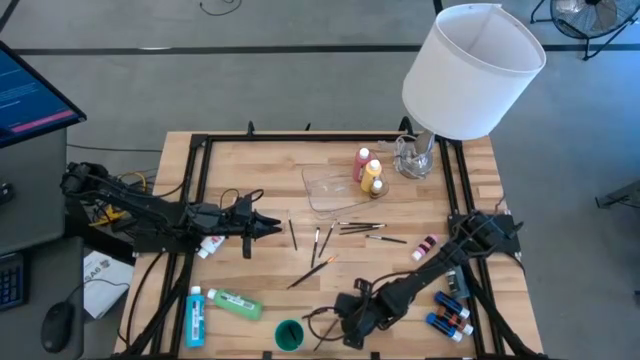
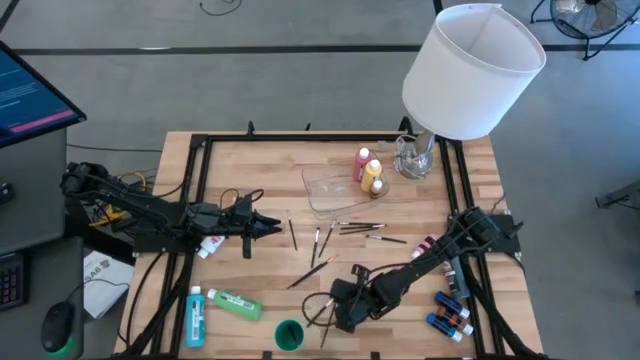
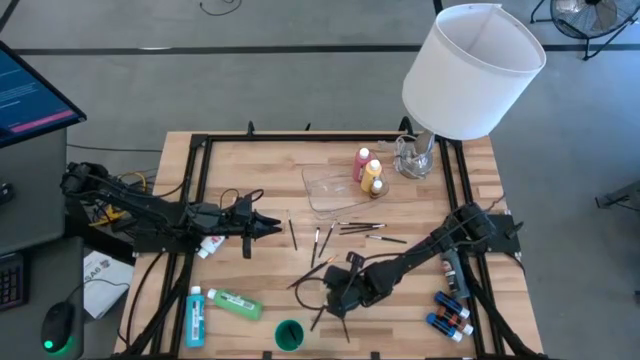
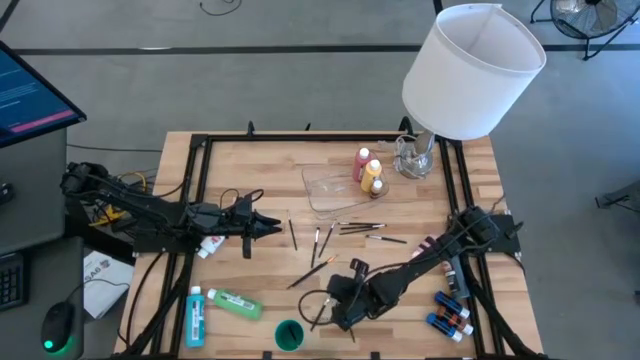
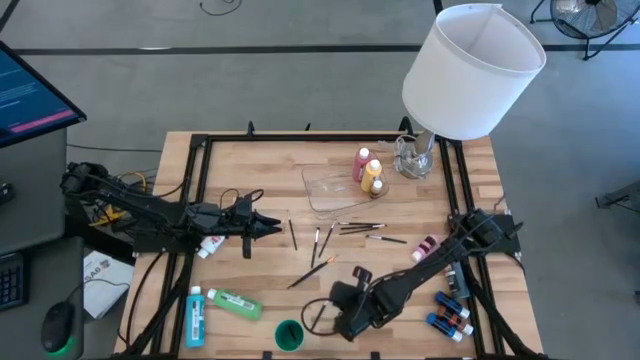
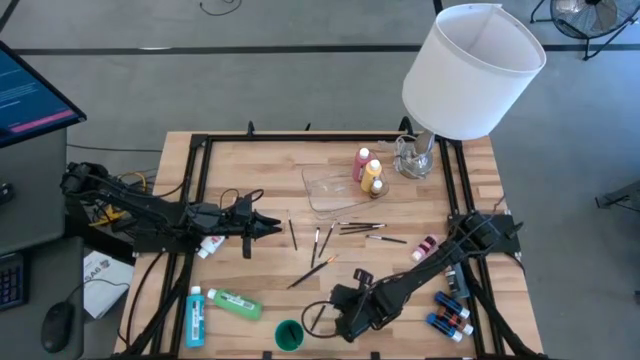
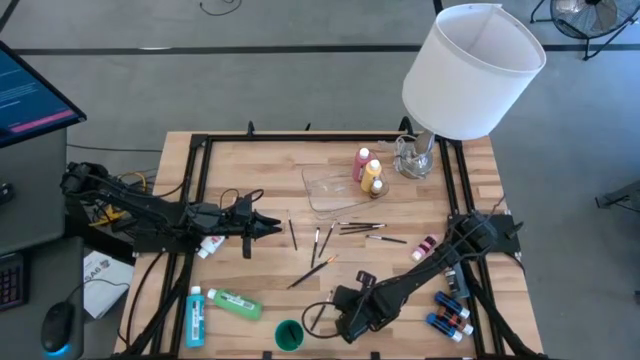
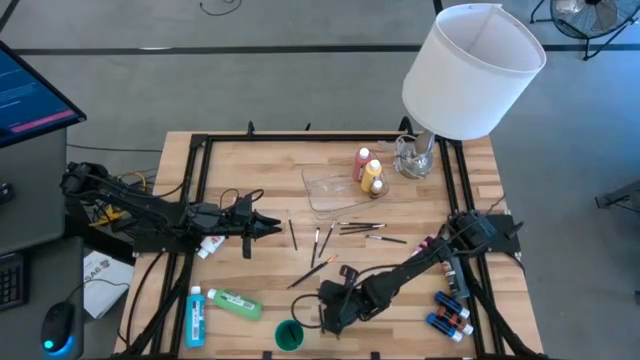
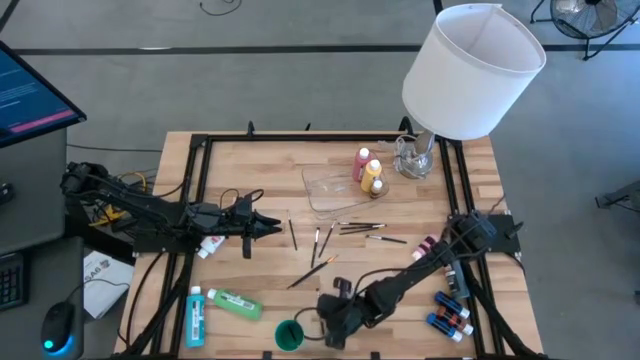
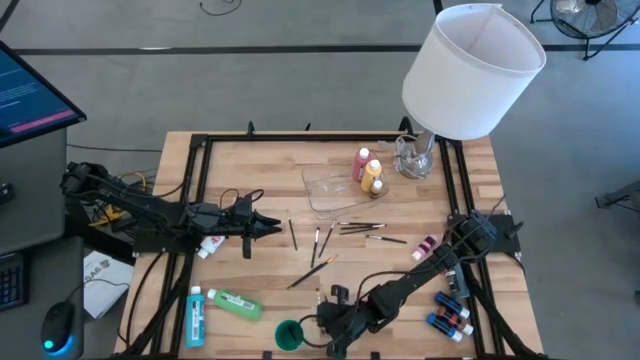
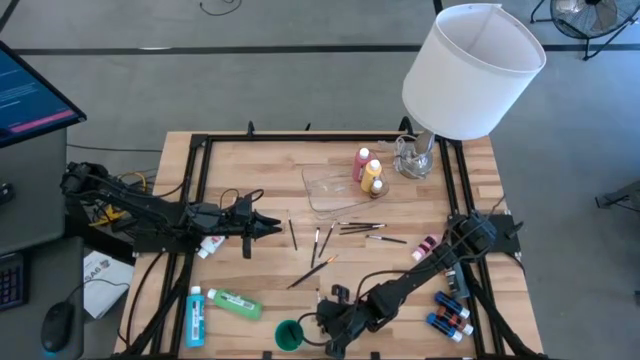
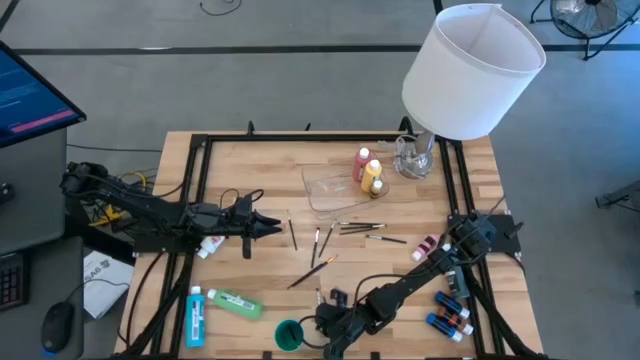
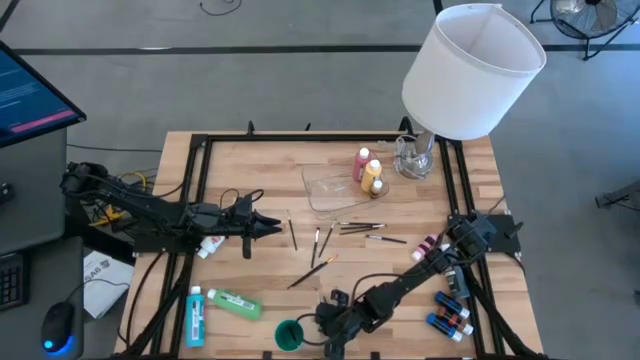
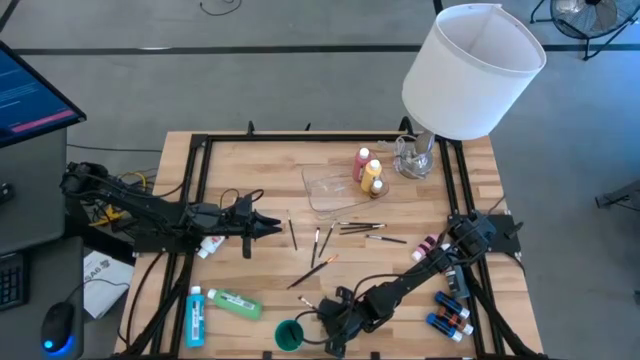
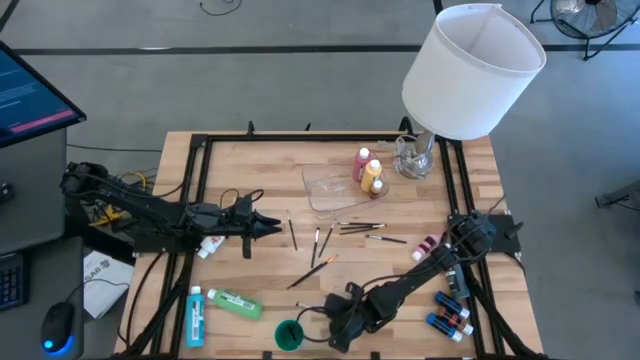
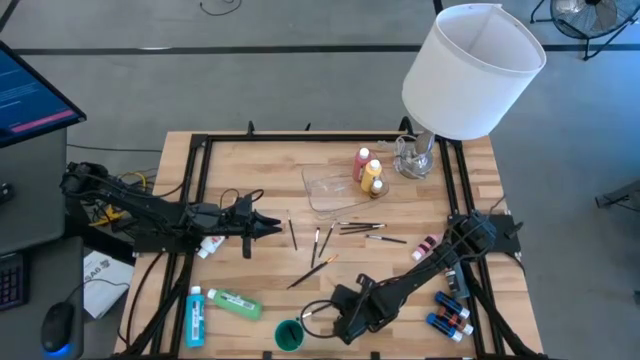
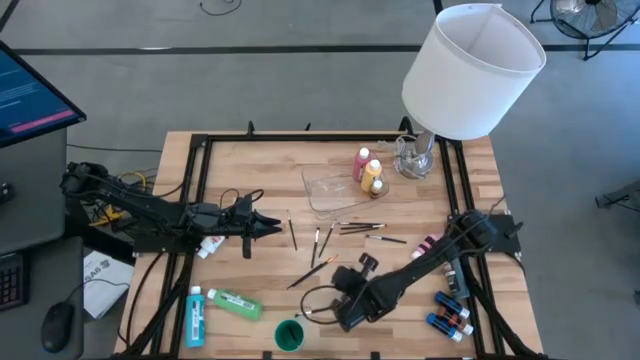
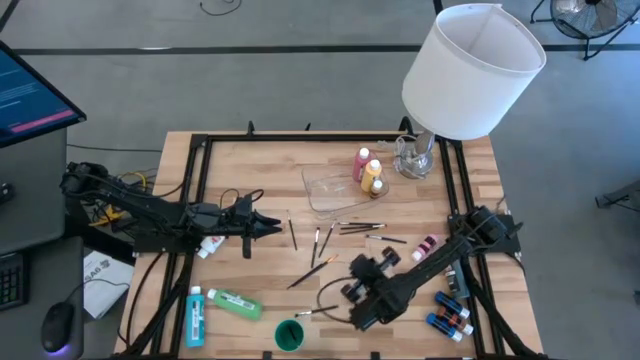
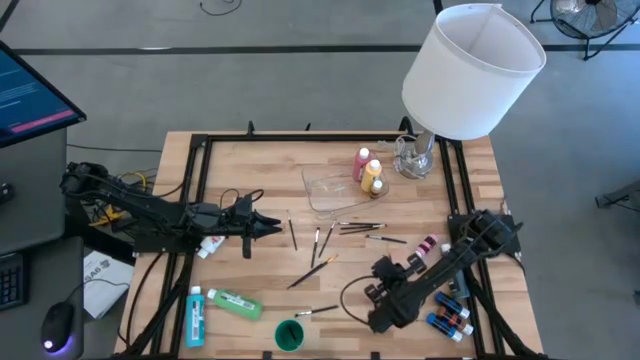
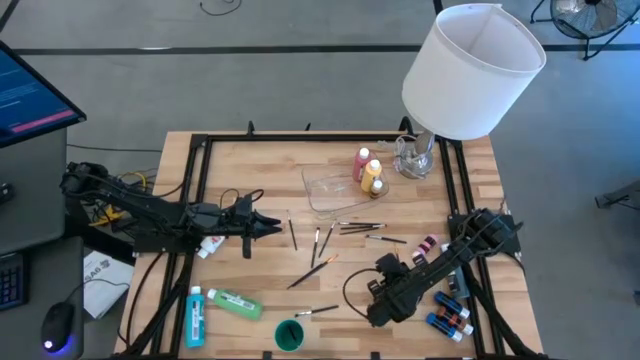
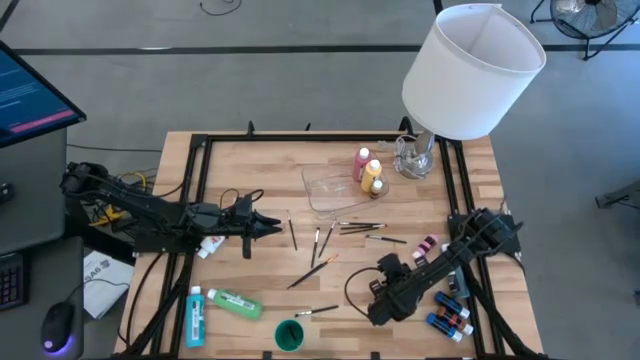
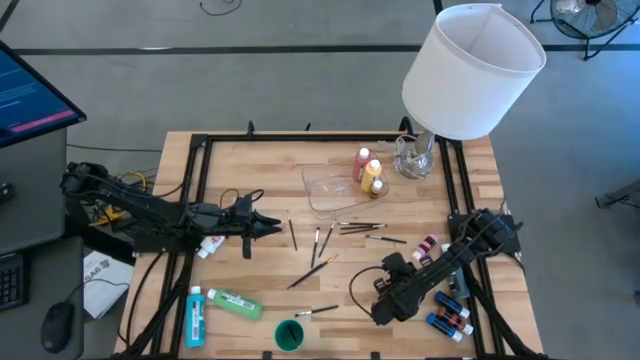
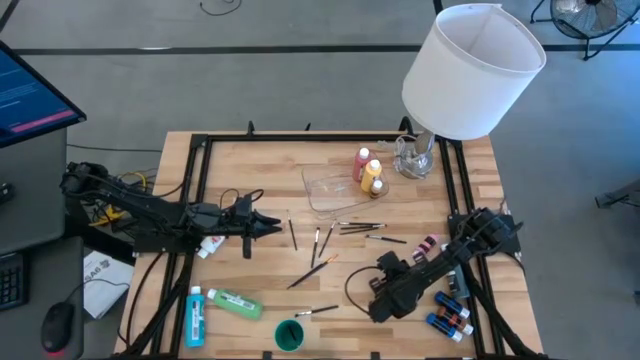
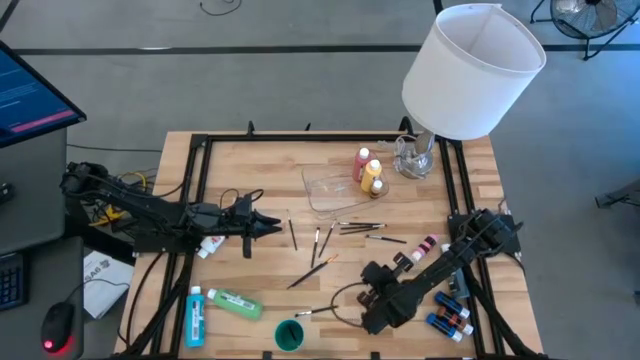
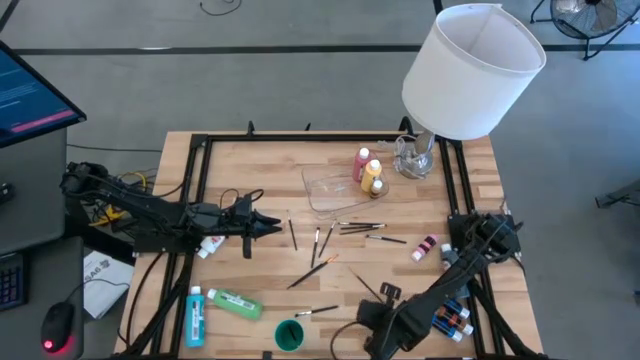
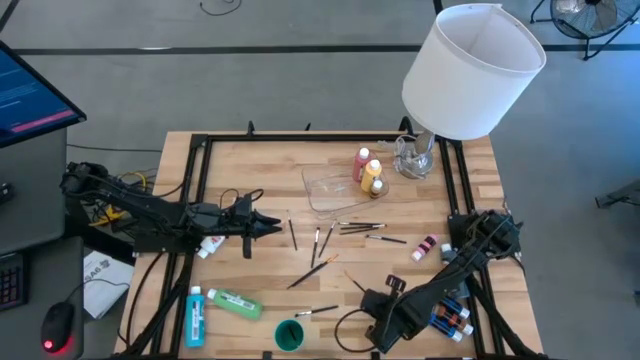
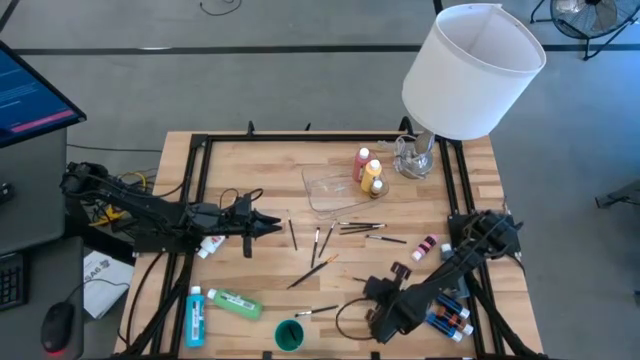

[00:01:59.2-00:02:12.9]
Task: Pick & Place Paint Supplies
Adjust the gold paintbrush on the table
